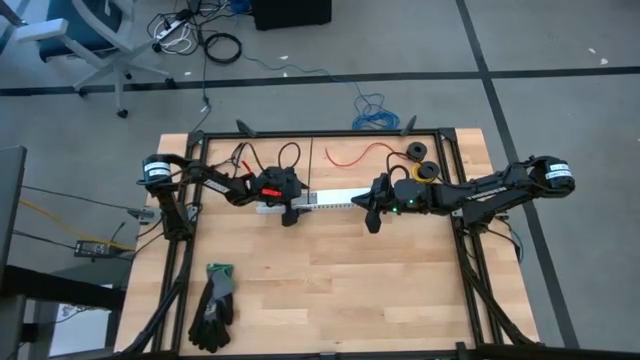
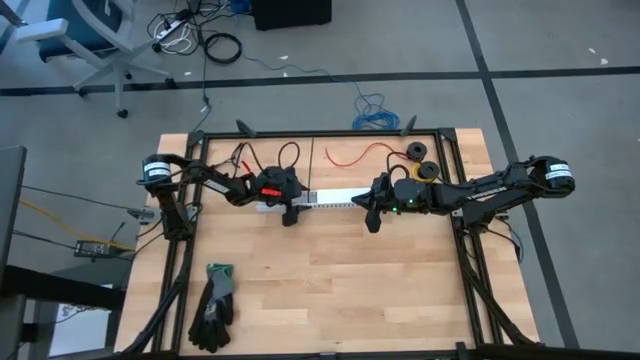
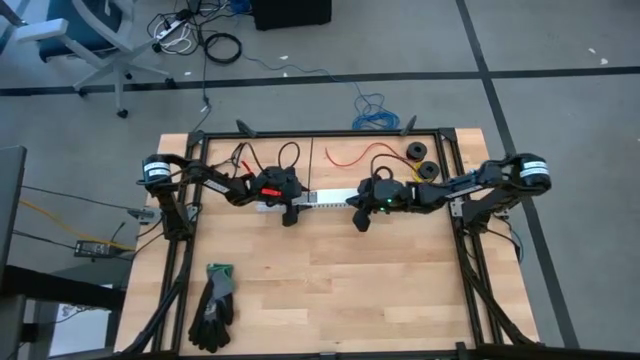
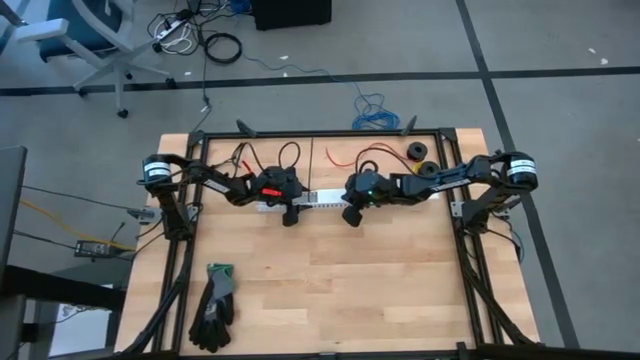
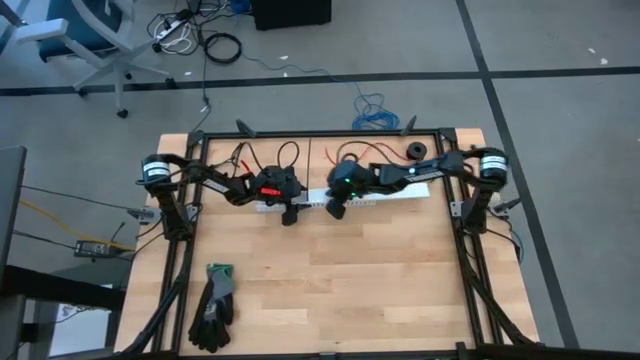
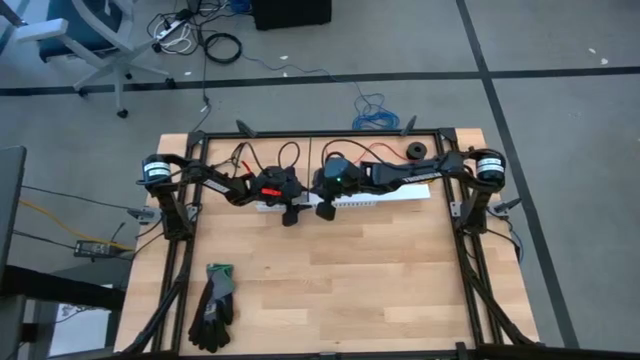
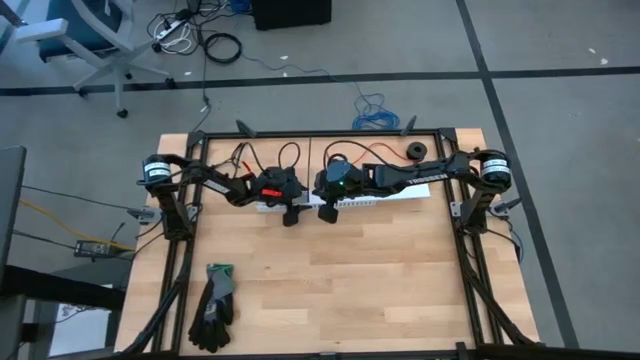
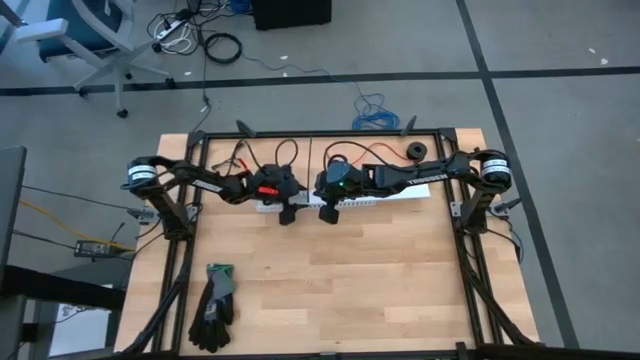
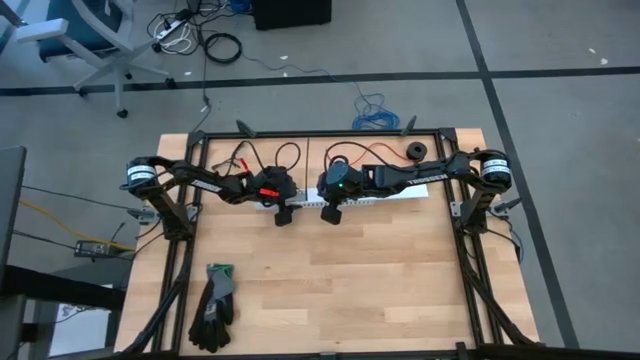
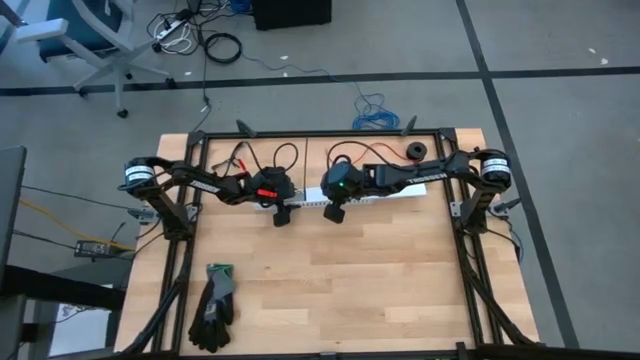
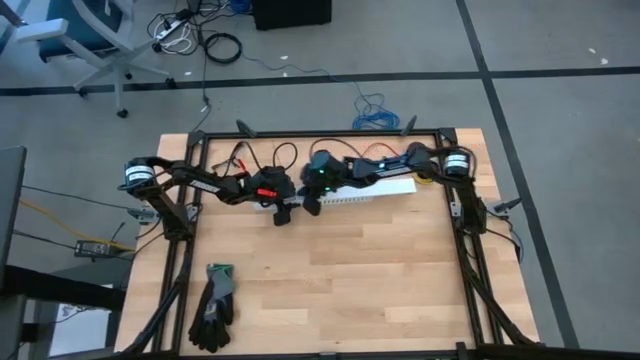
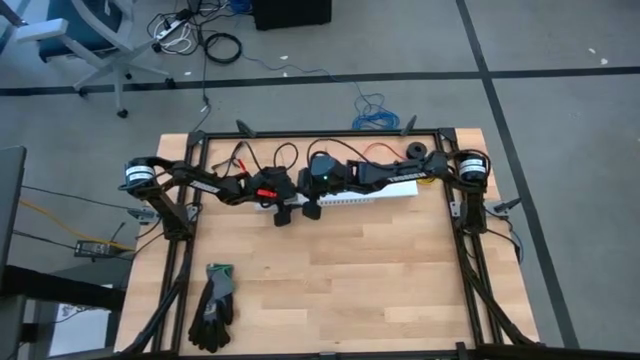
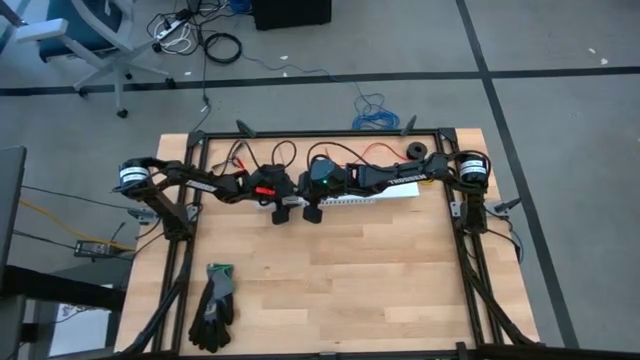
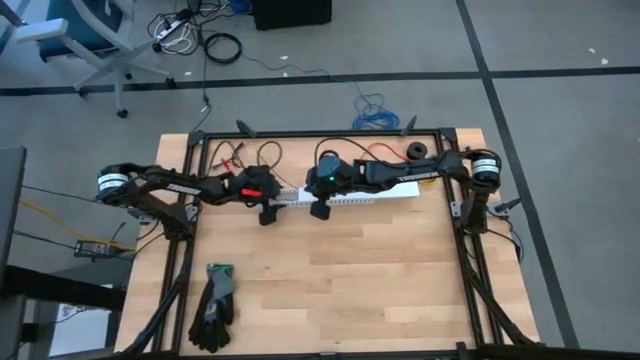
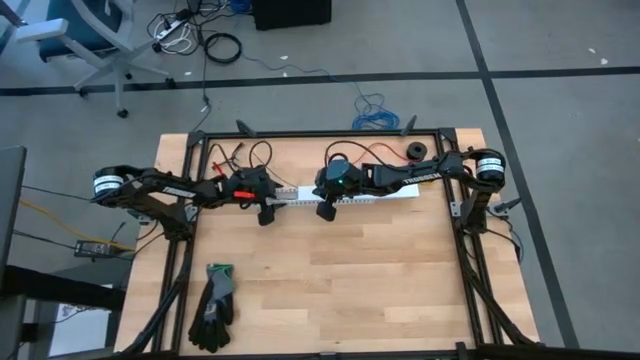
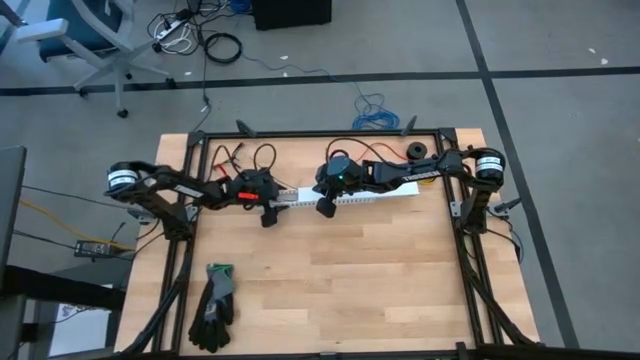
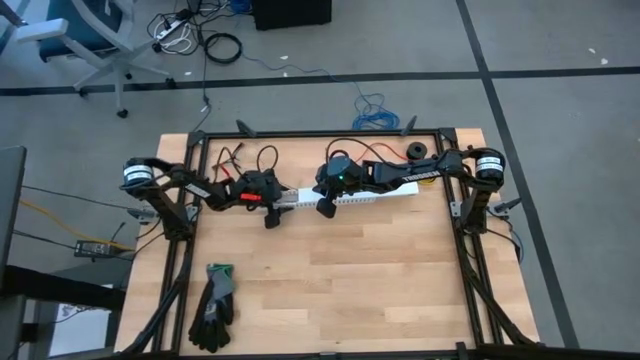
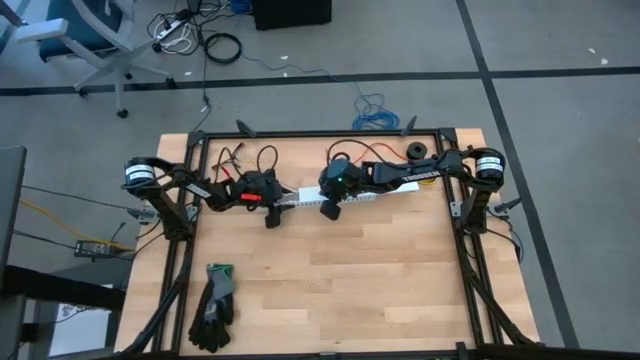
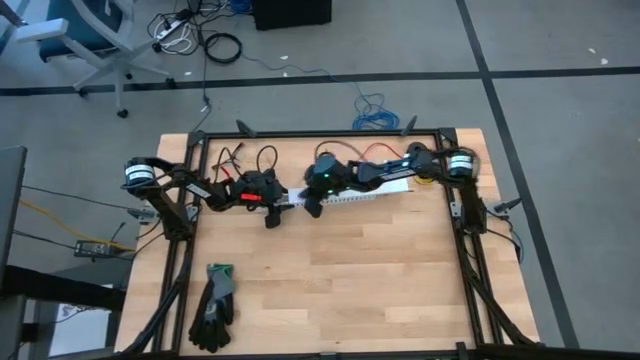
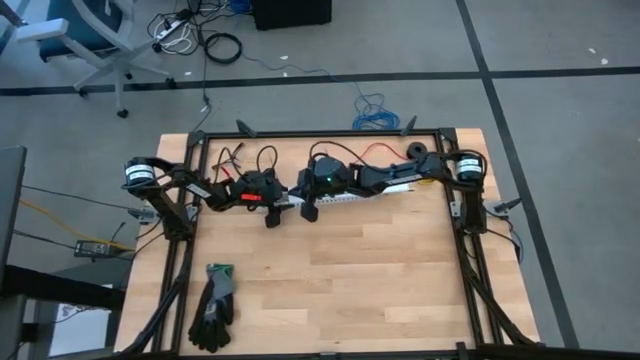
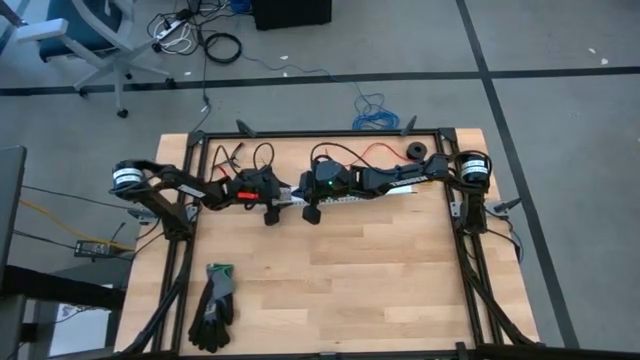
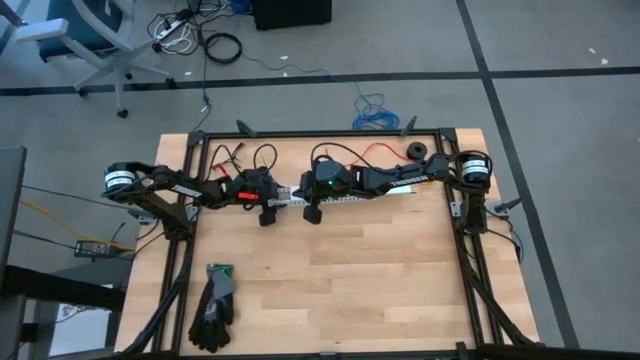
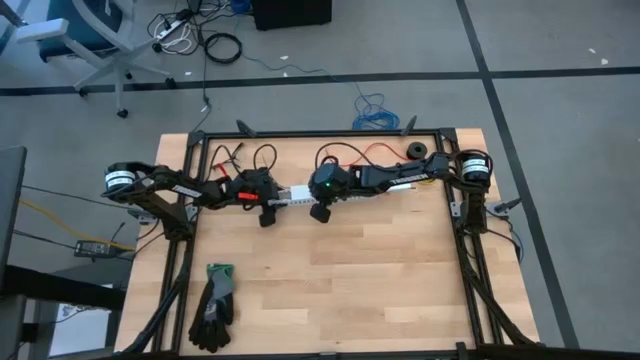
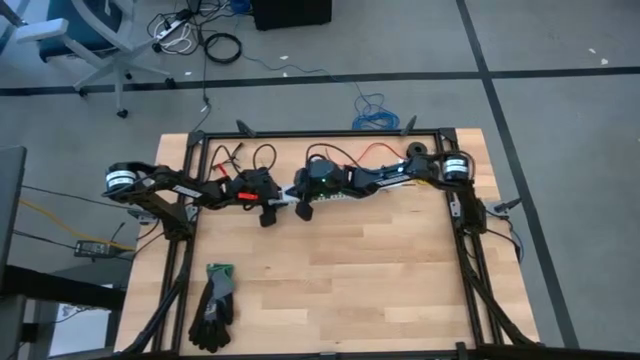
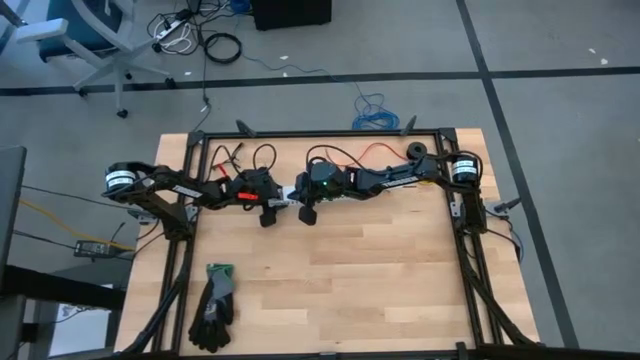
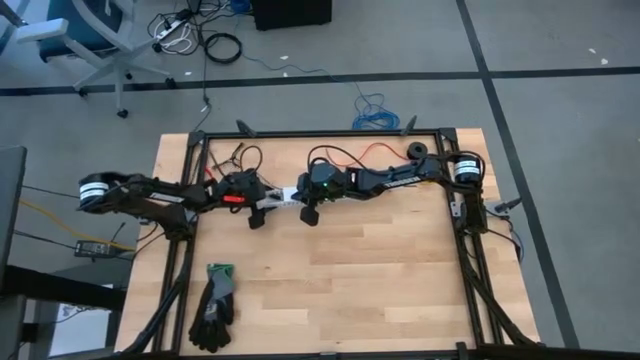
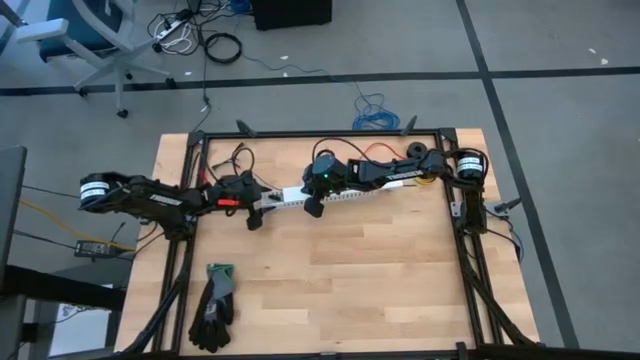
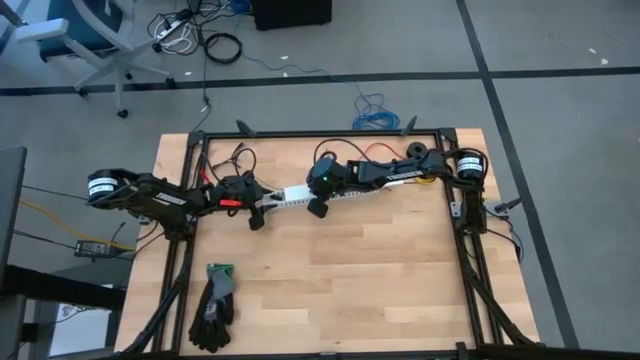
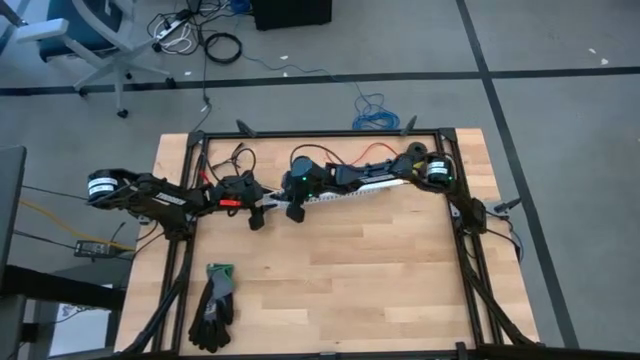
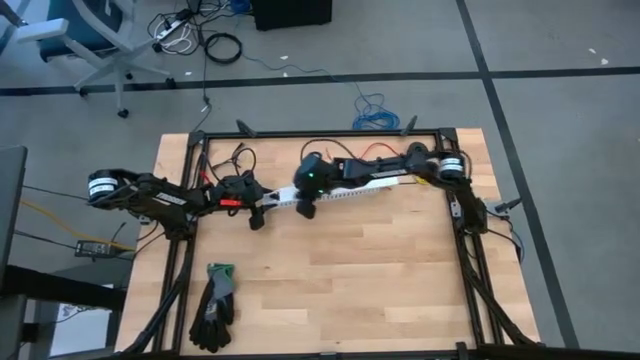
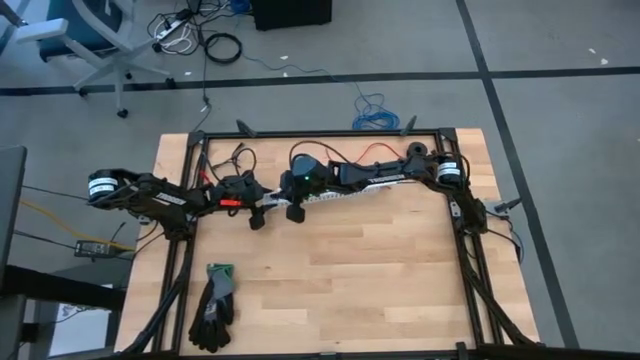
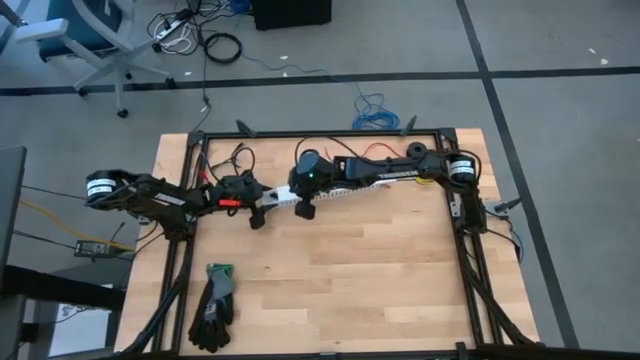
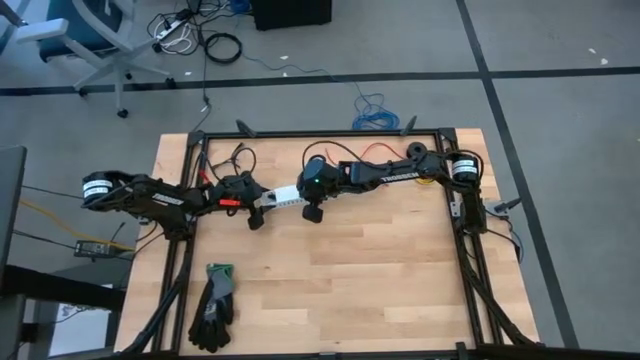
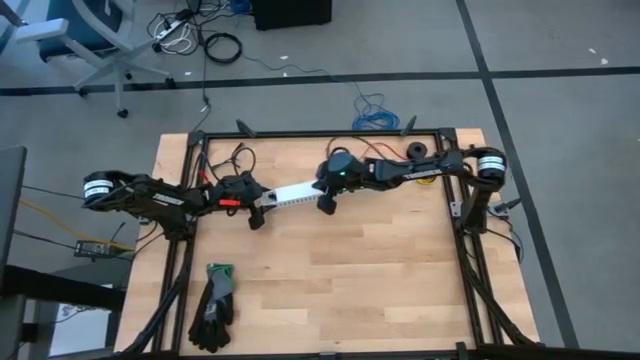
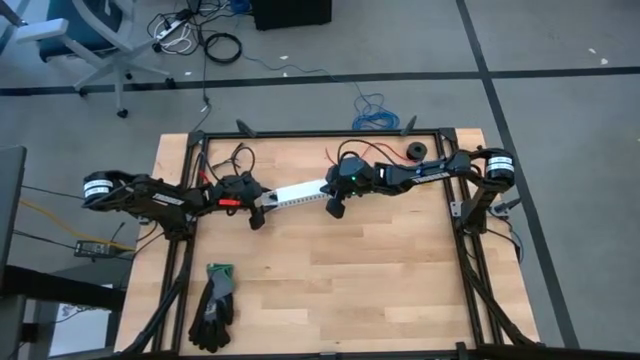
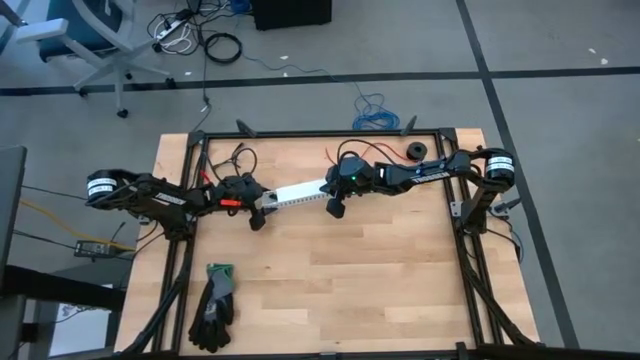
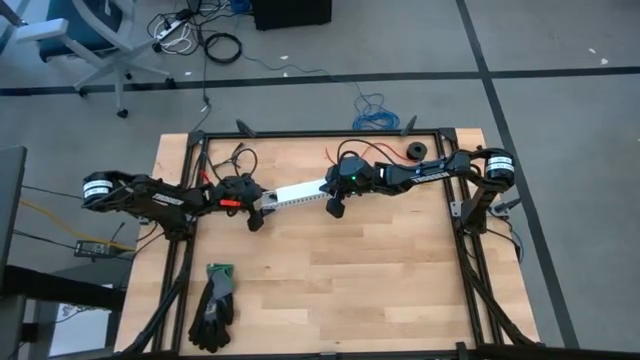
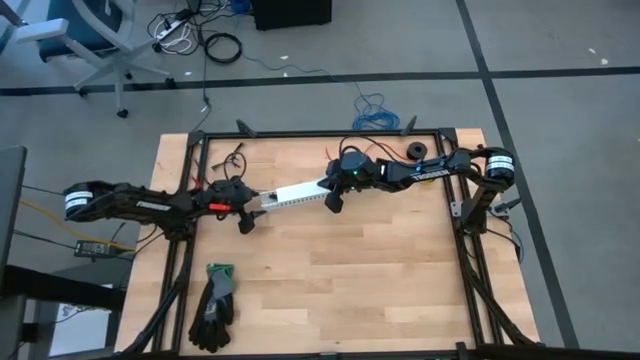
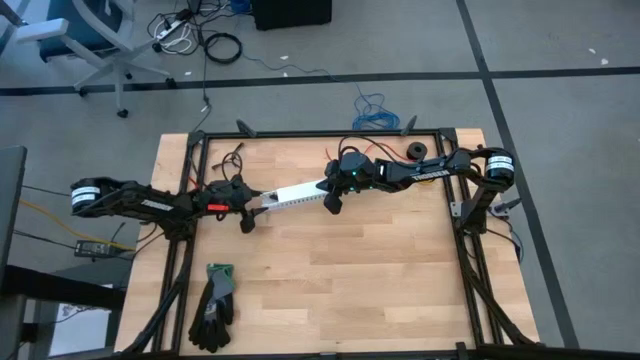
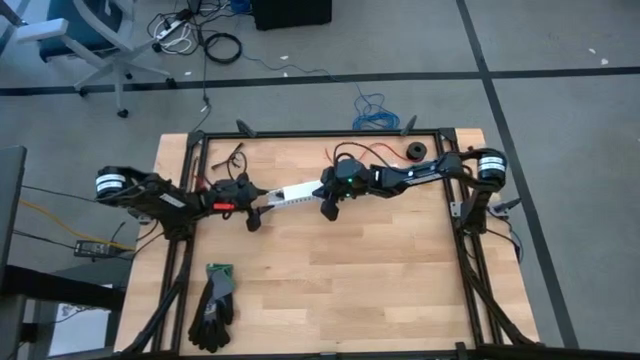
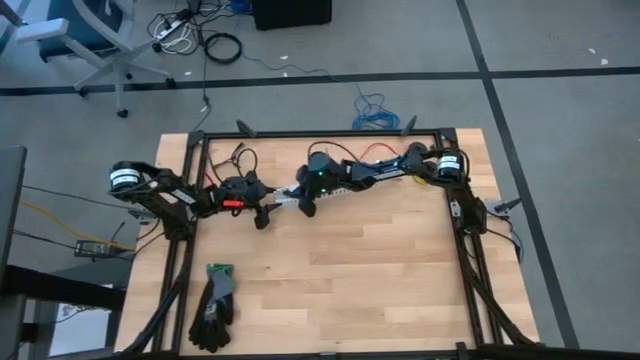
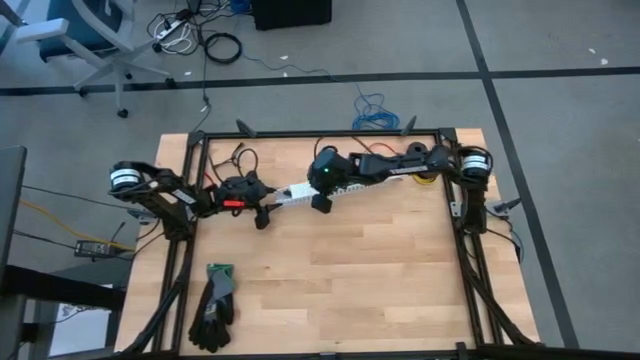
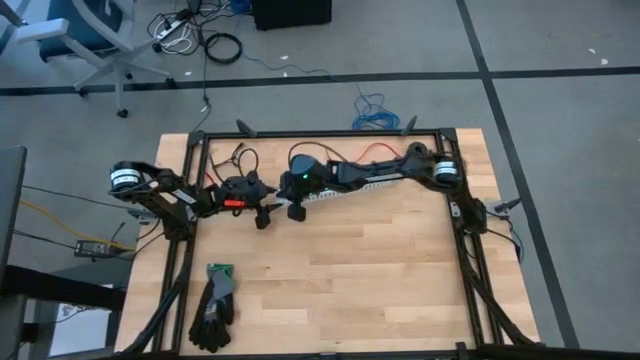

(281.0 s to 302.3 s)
Task: Ziptie cables
Close the cable duct with the cable duct lid

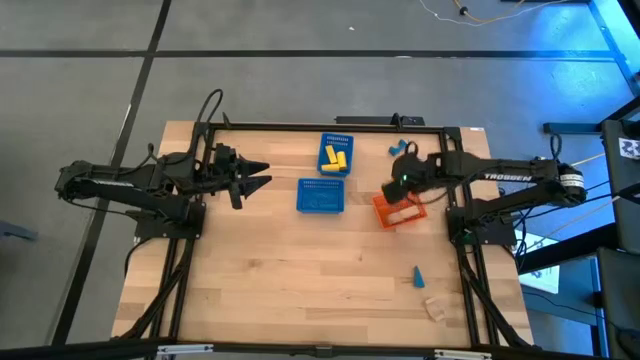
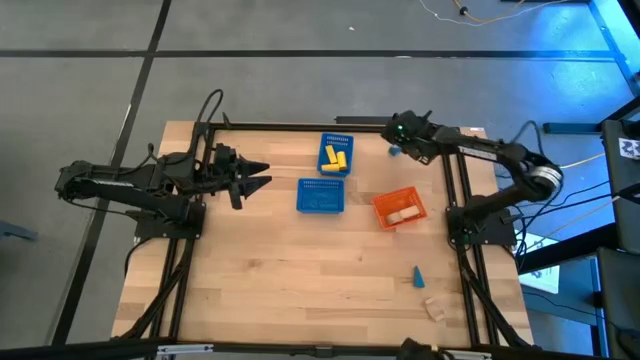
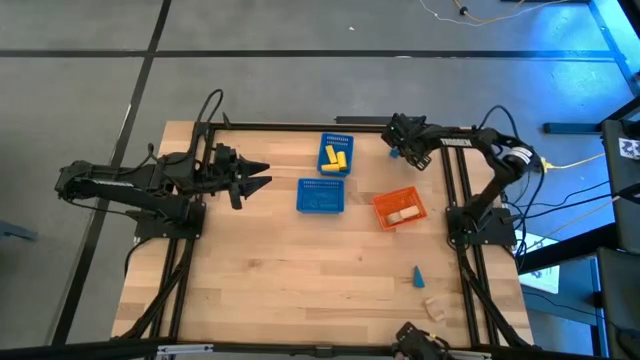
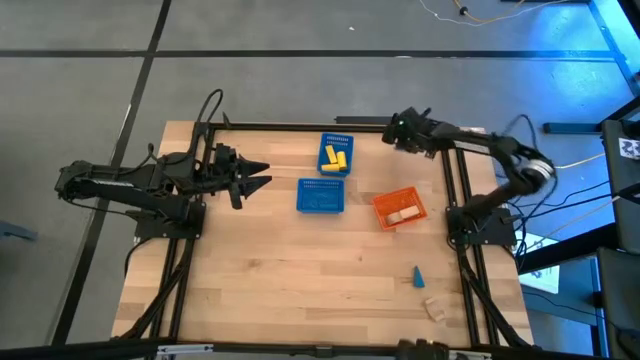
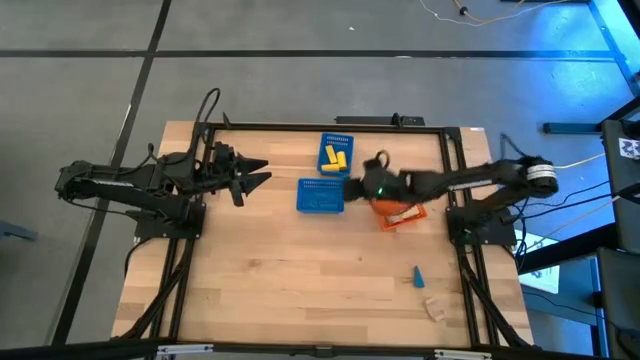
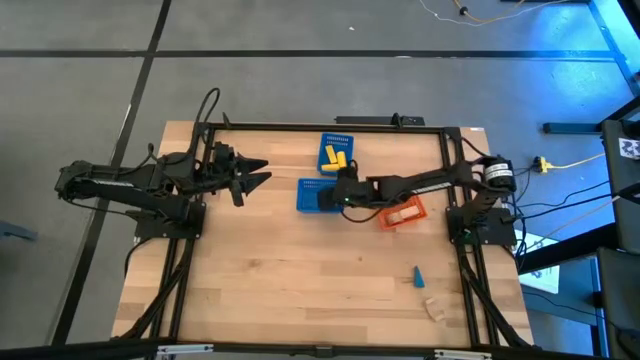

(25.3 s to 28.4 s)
Task: Sort & place blocks by color
Put the top blue block into the bottom blue basket
